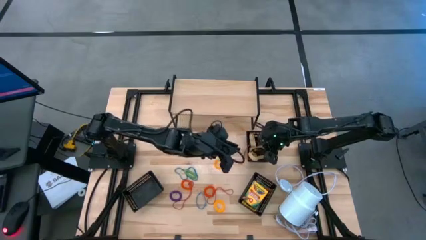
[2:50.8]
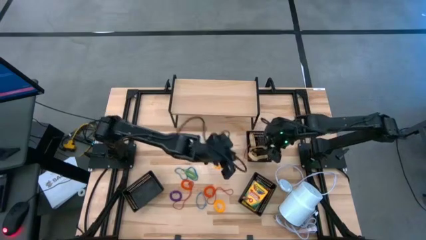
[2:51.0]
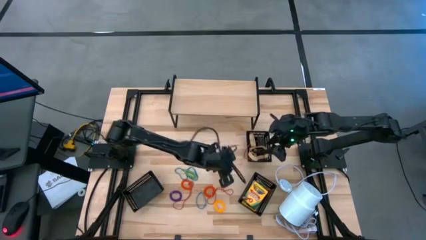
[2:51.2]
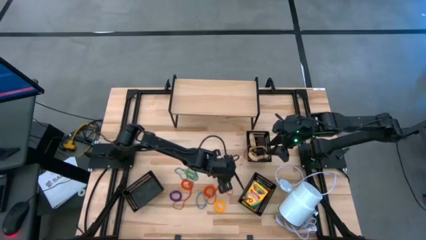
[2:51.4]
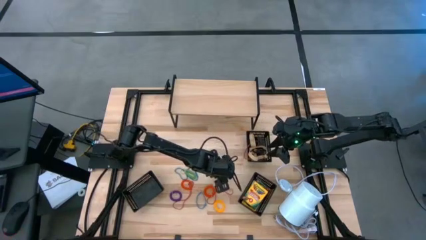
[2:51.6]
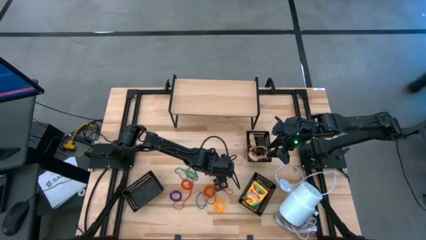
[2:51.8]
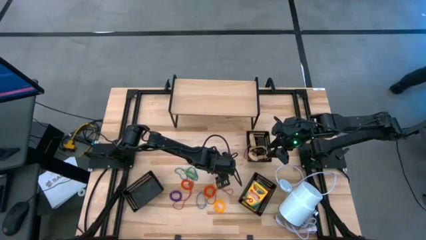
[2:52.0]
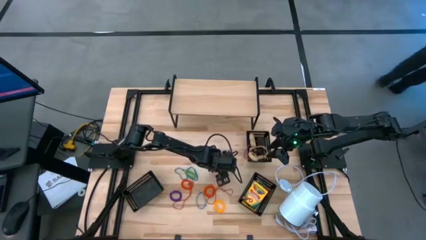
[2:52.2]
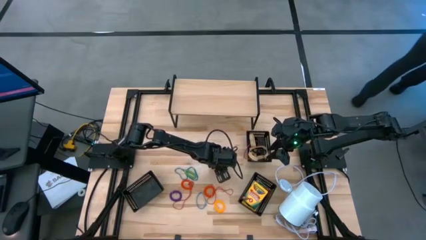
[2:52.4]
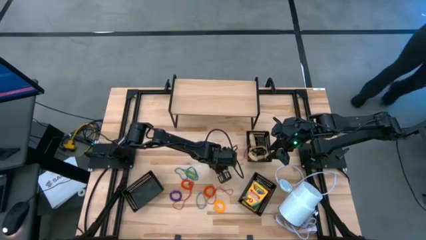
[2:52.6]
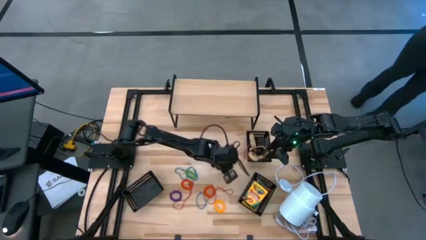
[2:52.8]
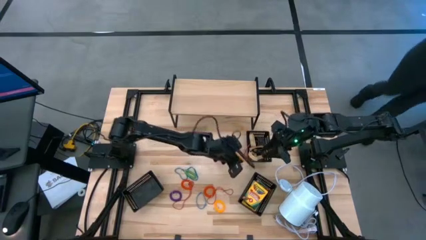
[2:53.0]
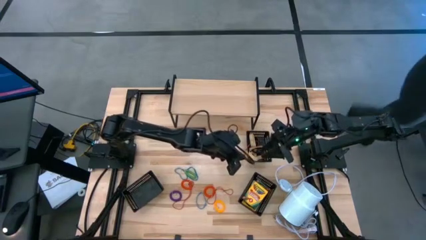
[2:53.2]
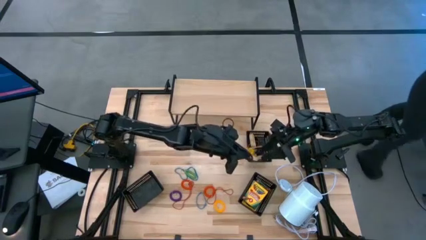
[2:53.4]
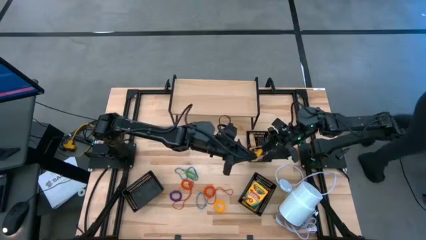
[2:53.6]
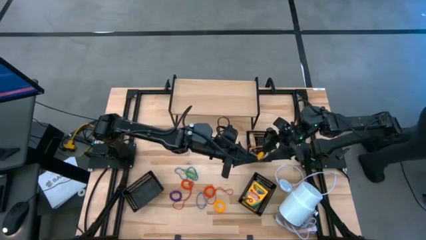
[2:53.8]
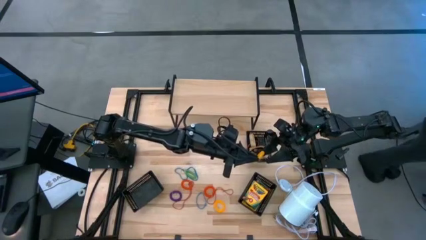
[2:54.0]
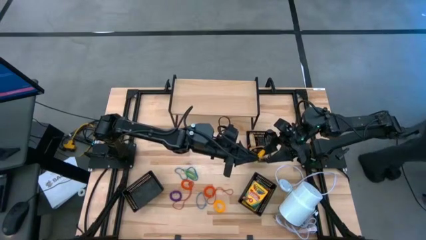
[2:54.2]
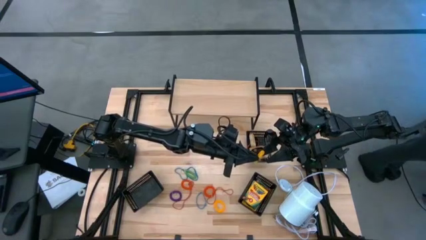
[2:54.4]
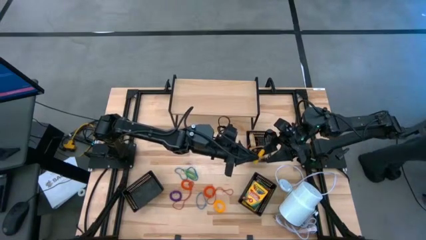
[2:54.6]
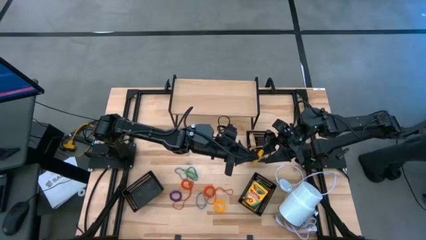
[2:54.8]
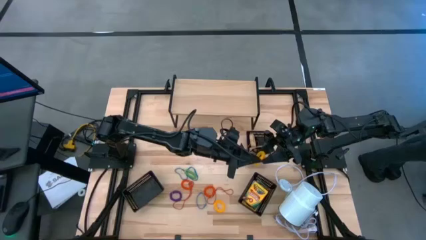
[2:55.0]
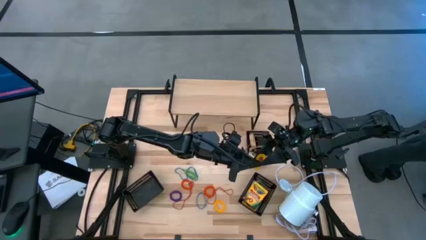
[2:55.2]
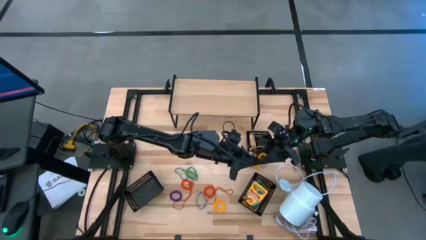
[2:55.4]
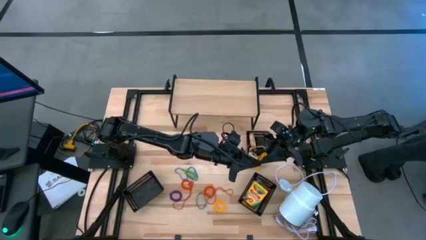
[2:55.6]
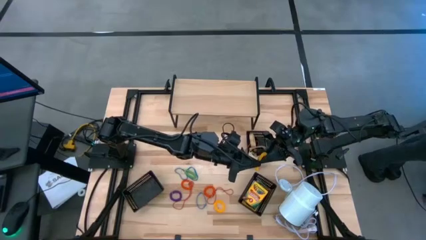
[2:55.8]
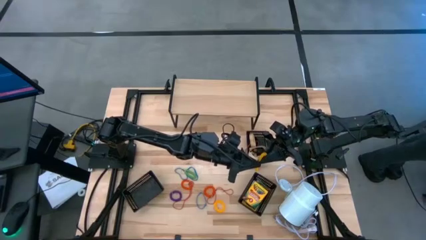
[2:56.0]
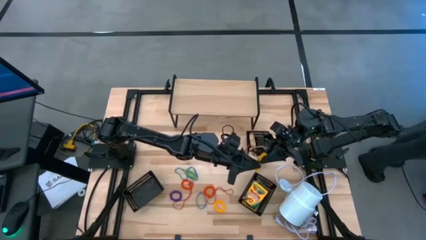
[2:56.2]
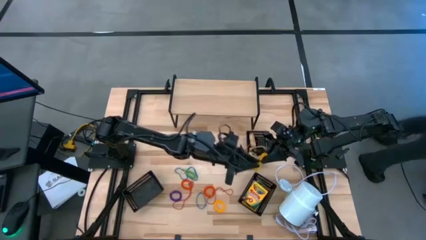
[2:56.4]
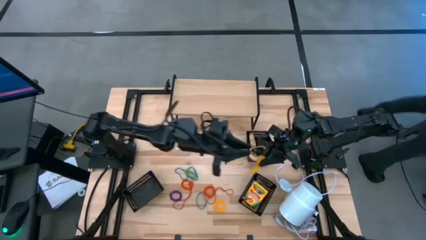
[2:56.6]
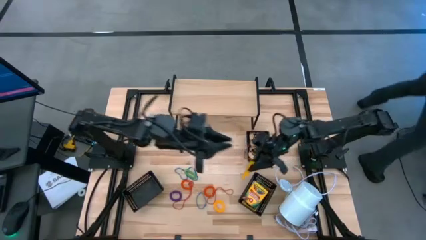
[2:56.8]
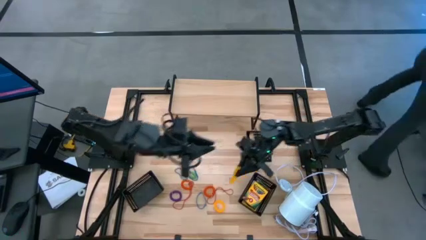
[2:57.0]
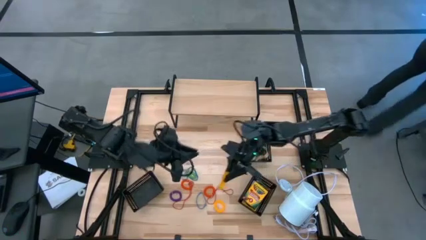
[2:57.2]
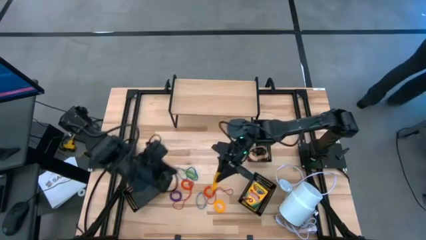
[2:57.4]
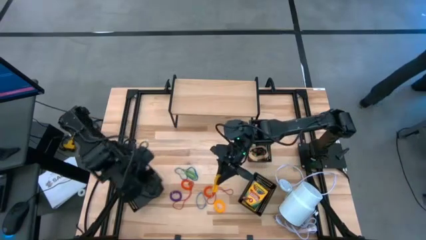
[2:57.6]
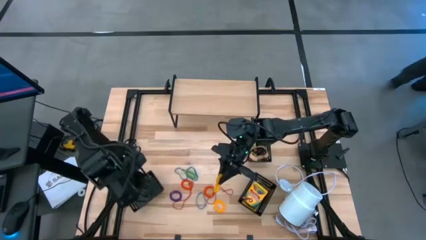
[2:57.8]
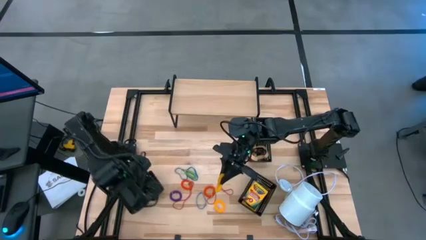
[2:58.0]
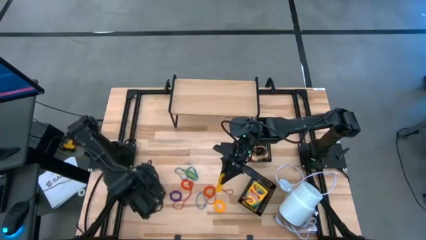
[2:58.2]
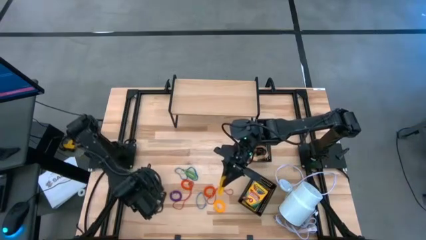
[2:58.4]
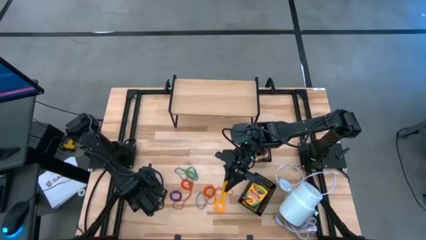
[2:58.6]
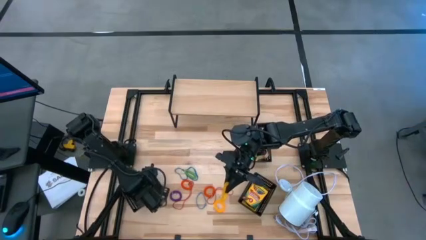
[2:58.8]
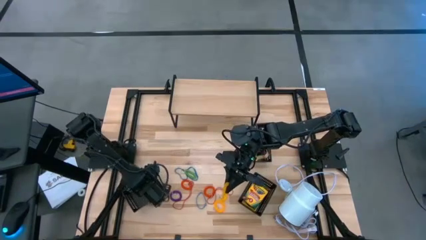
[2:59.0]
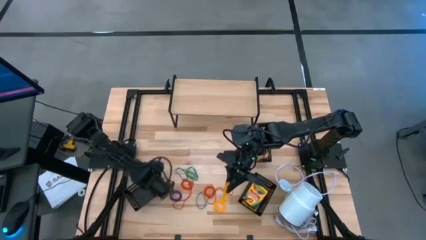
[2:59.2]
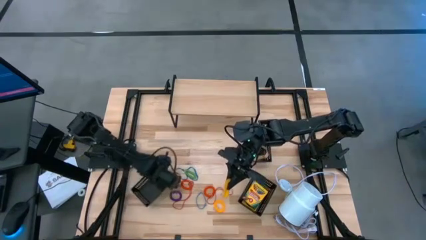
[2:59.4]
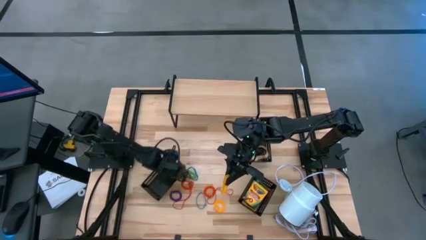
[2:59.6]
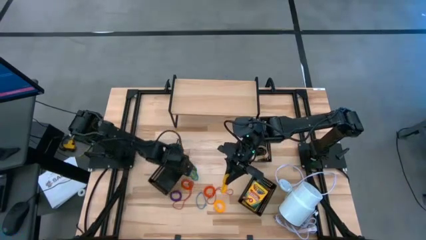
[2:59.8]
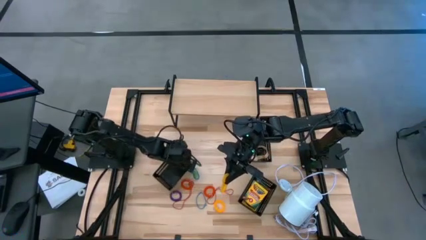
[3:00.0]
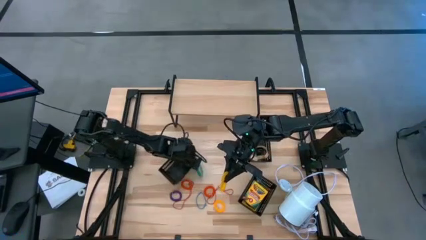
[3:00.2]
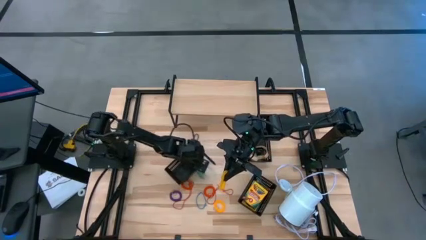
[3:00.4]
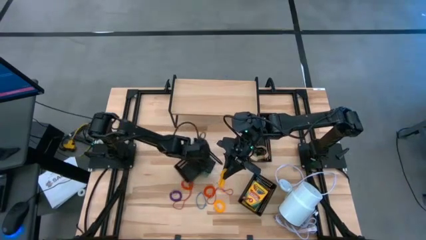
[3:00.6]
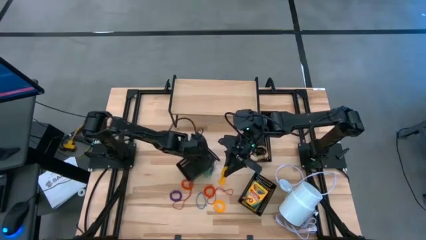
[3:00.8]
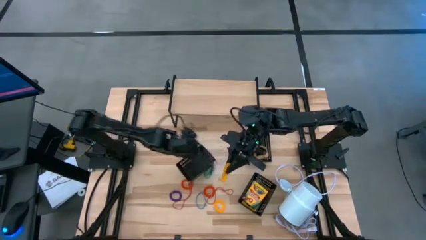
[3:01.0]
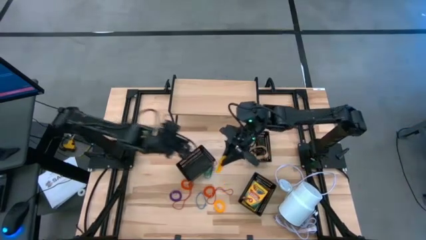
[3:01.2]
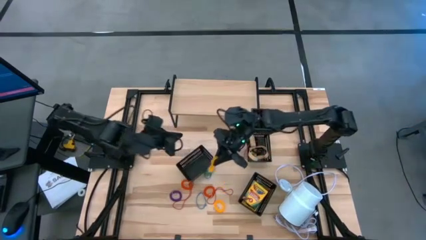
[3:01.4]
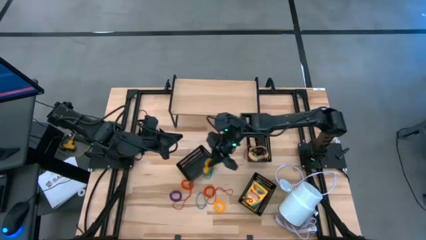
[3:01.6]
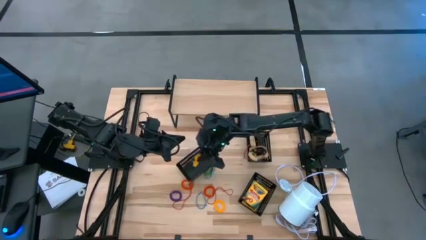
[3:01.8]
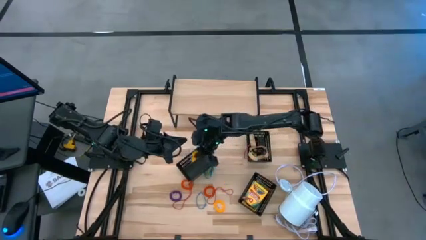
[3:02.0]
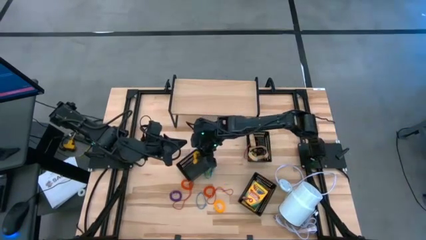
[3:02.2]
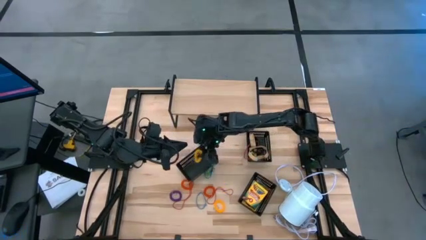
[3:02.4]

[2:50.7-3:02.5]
Task: Pick & Place Office Desk Supplies
Put the top orange spring keychain into the left black bin

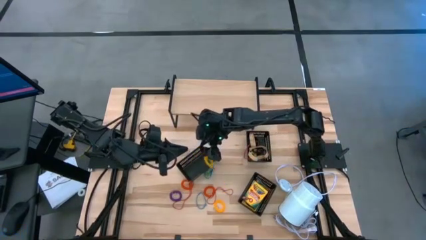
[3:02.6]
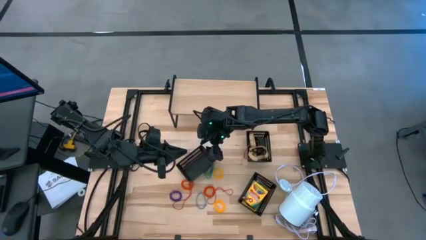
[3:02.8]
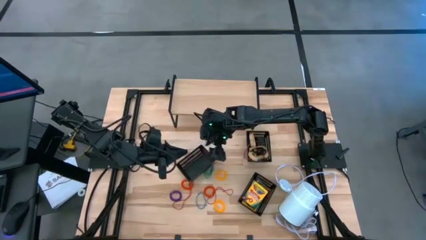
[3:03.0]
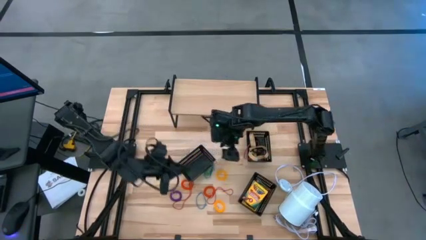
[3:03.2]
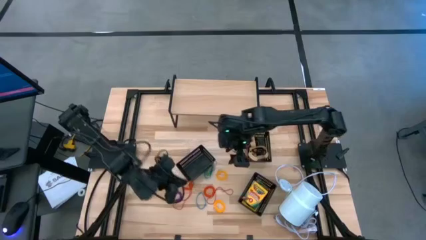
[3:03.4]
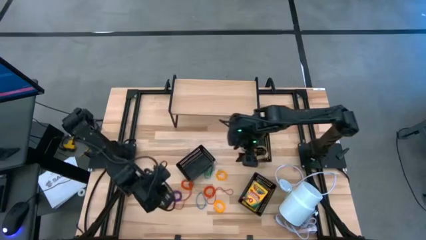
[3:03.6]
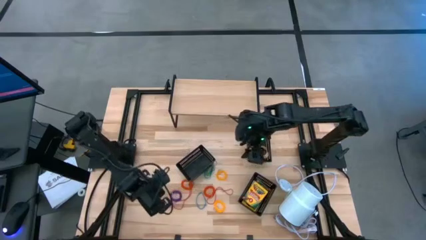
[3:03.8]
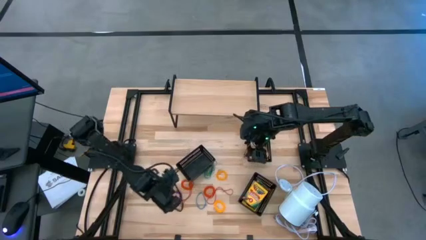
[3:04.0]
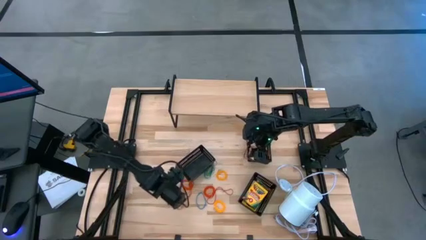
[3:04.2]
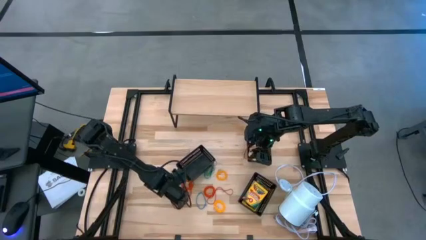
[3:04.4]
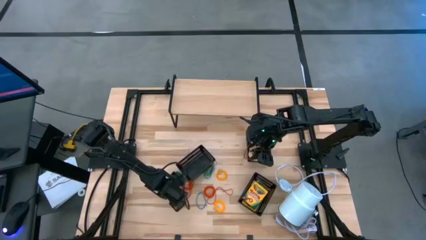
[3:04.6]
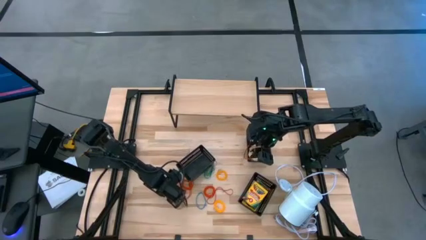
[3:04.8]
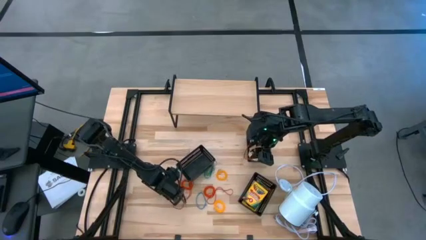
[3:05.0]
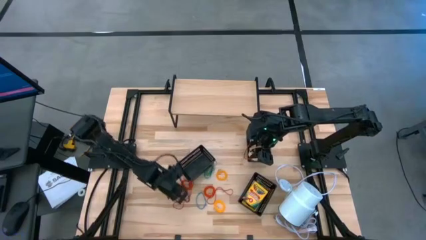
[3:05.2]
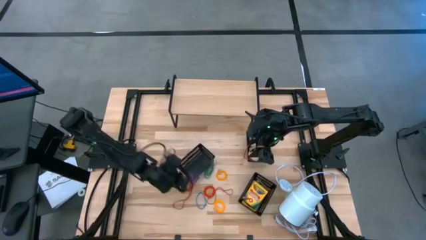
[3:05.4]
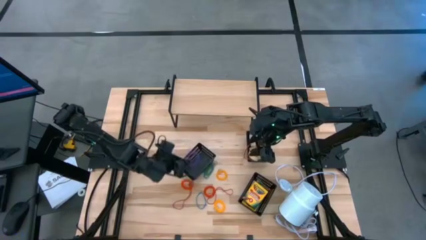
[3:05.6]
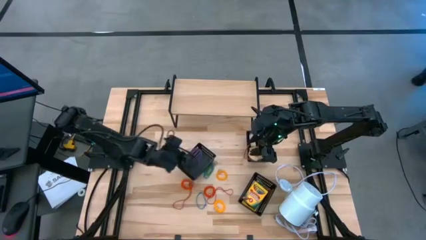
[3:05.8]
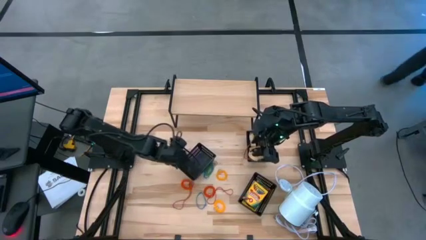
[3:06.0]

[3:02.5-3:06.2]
Put the violet spring keychain into the left black bin

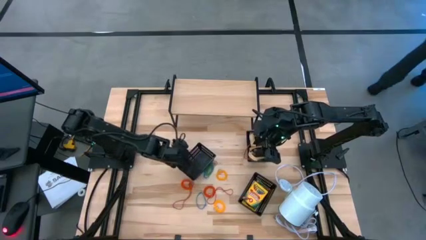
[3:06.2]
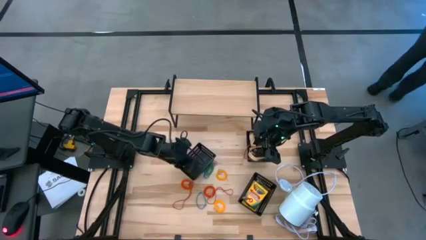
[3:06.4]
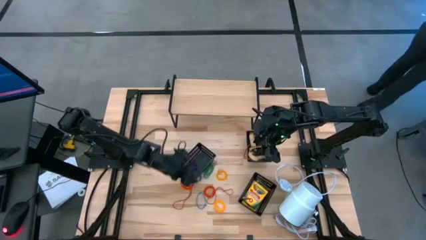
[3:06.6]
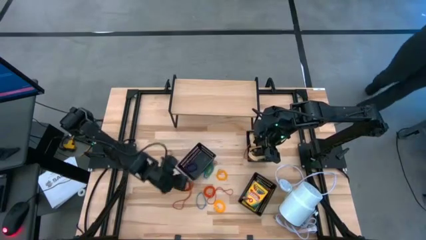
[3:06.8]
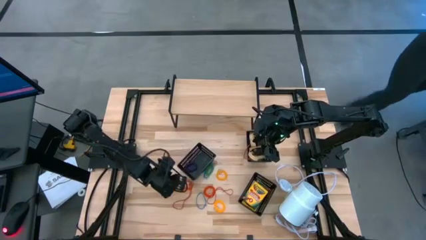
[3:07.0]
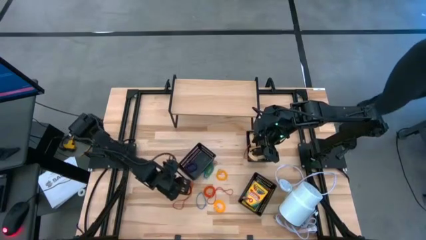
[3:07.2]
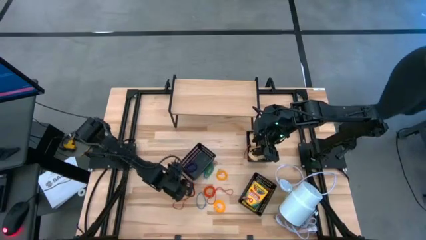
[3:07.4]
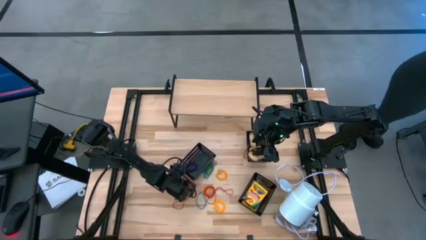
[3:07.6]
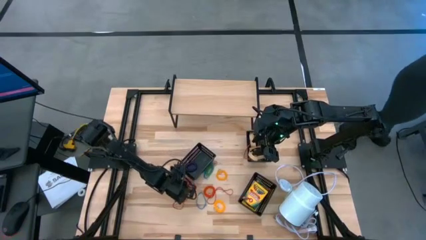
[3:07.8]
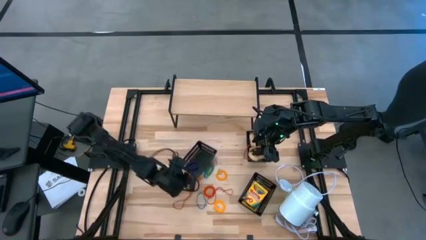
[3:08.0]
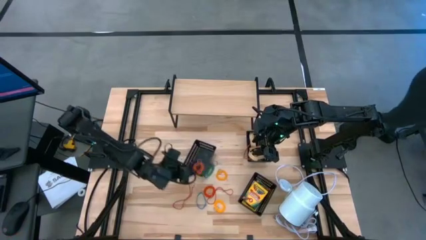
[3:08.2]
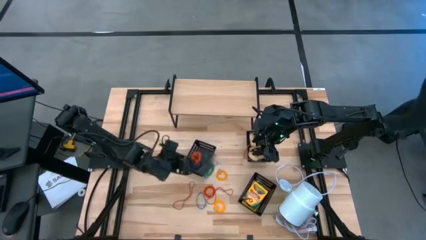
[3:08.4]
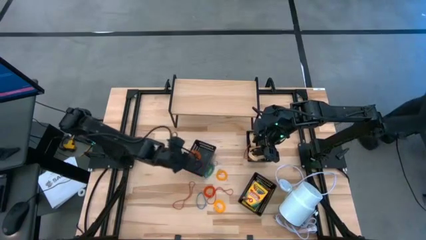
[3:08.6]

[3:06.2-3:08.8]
Put the left orange spring keychain into the left black bin
